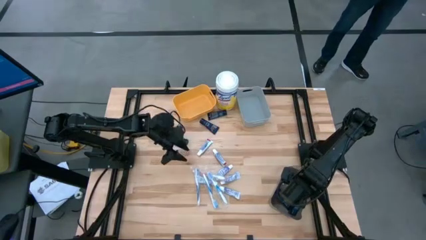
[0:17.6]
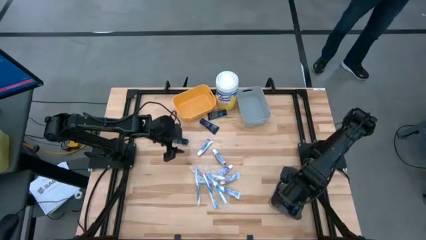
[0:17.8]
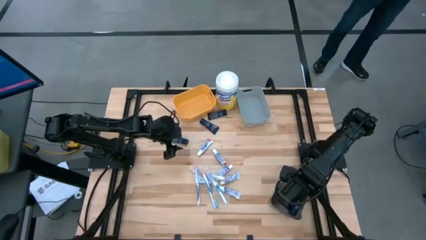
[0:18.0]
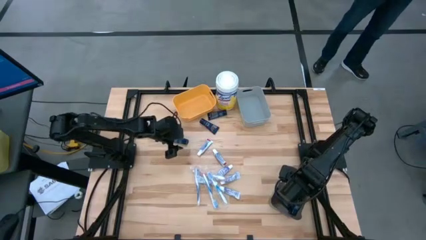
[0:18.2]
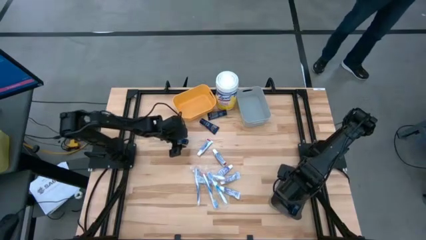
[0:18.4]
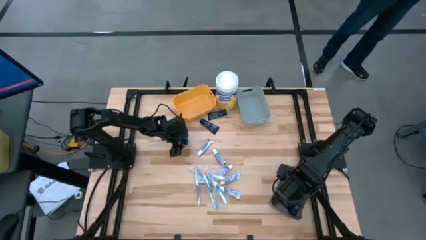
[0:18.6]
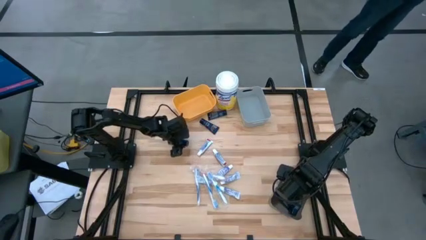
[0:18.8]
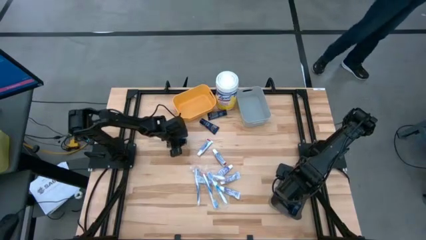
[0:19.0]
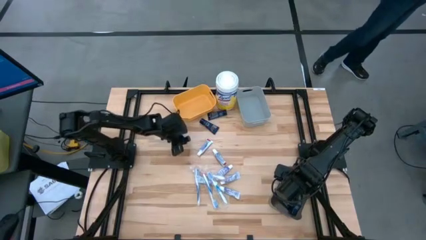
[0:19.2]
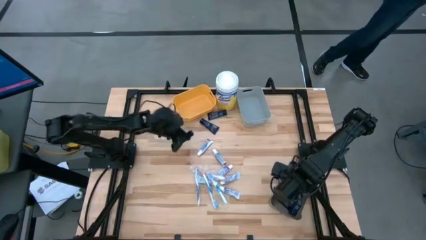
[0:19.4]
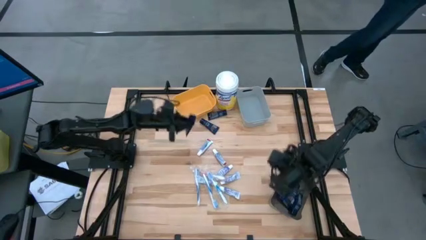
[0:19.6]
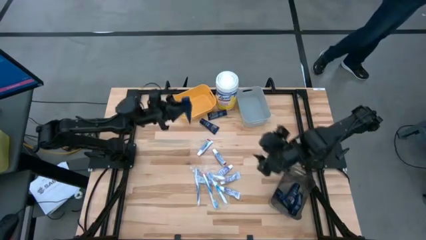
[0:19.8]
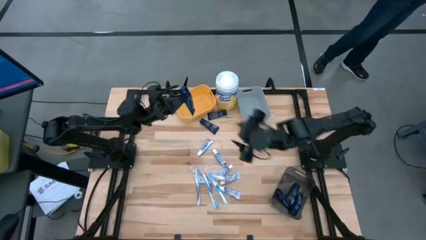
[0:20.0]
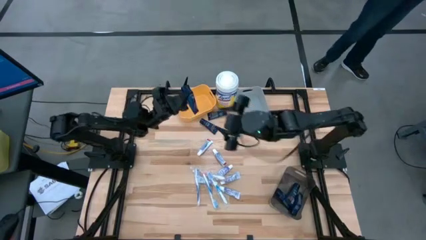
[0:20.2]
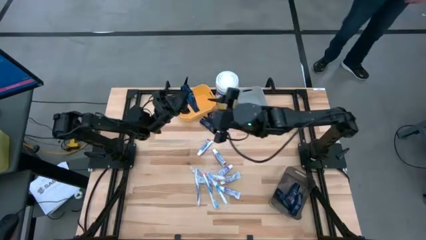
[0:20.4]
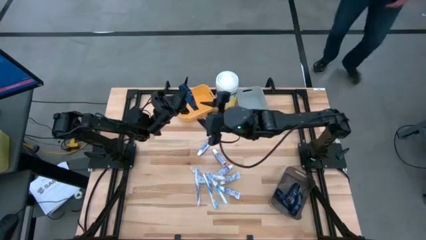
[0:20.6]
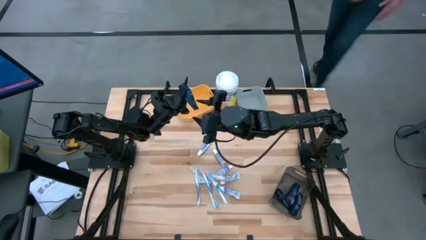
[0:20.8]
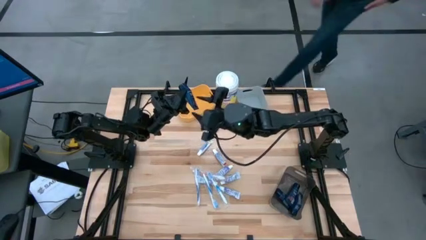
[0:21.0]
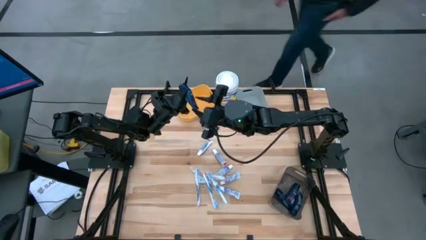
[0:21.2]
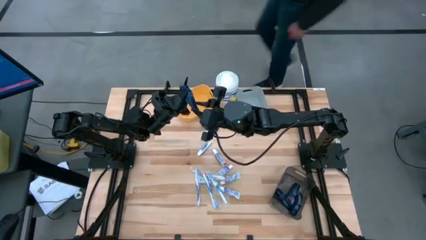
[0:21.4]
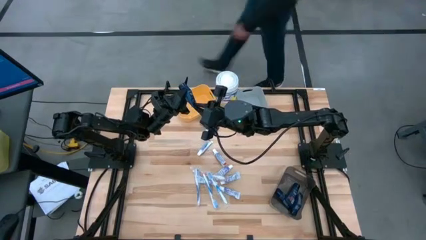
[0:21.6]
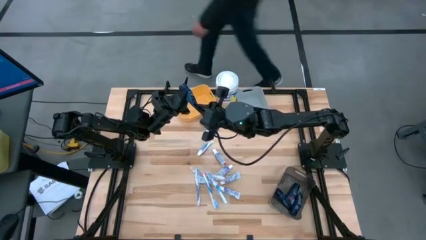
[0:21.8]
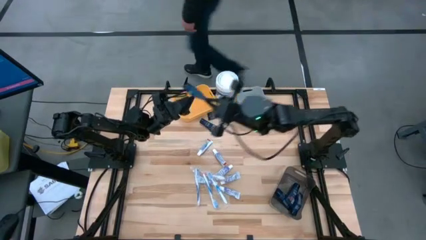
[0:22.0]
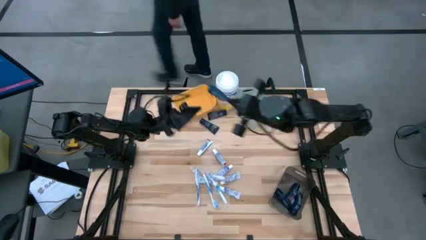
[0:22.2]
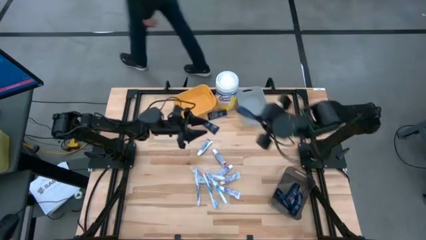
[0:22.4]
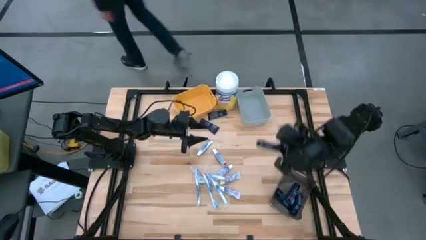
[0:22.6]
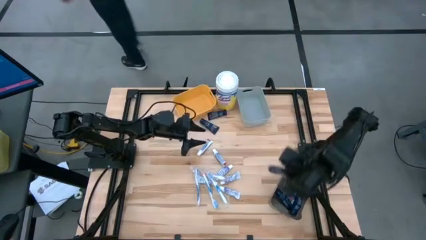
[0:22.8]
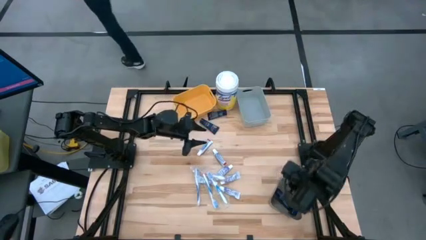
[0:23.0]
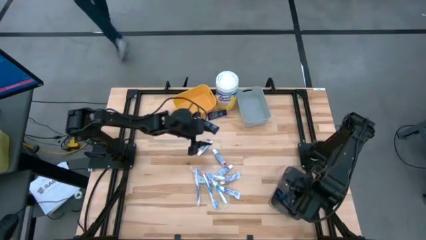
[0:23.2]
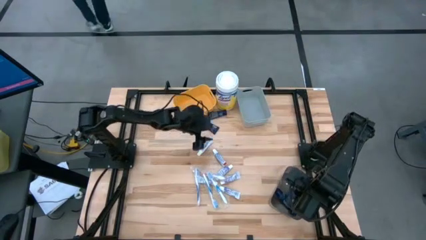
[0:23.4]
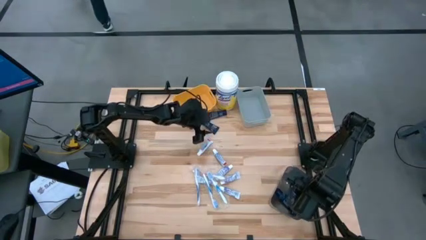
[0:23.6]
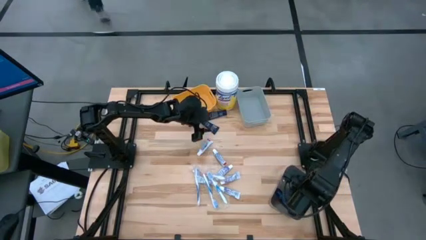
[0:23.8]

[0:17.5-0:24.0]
Task: Pick & Place Travel size toiletries
Put the blue shaving butter into the black bin

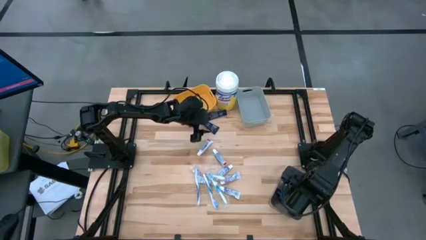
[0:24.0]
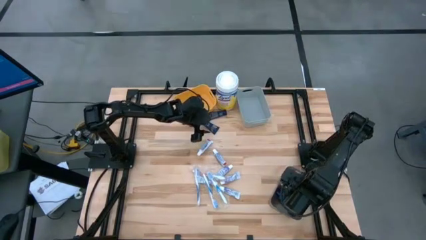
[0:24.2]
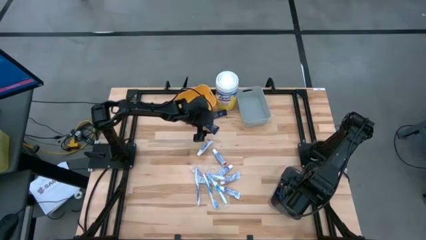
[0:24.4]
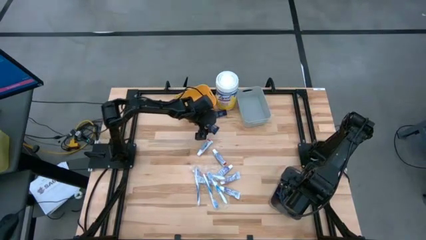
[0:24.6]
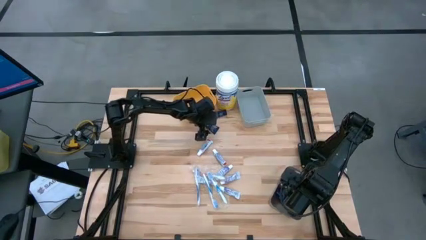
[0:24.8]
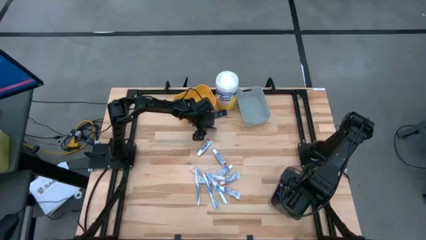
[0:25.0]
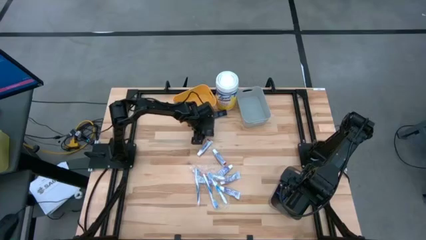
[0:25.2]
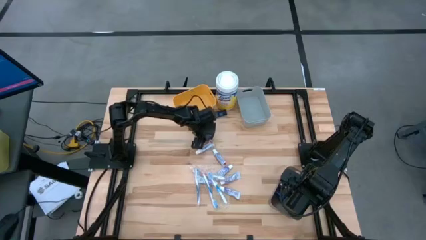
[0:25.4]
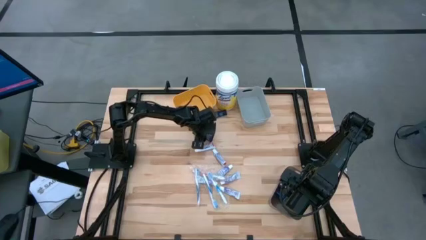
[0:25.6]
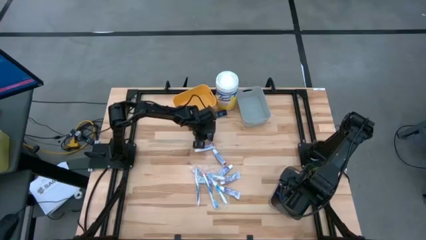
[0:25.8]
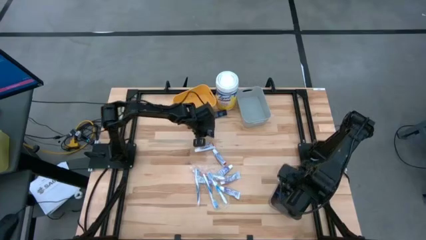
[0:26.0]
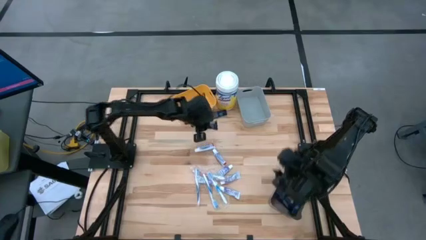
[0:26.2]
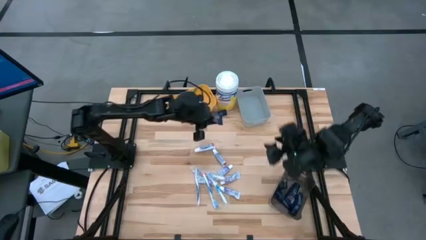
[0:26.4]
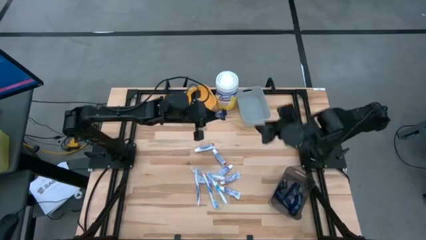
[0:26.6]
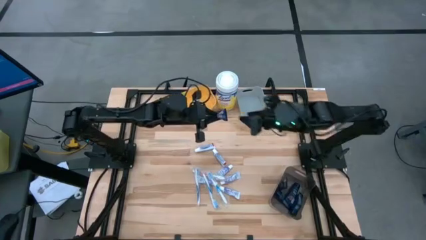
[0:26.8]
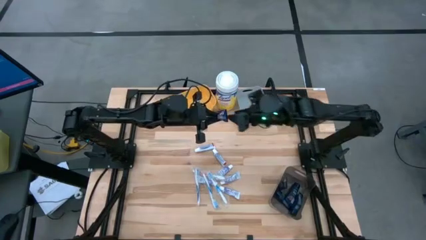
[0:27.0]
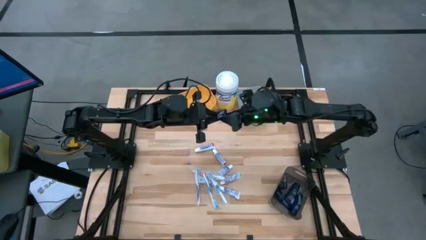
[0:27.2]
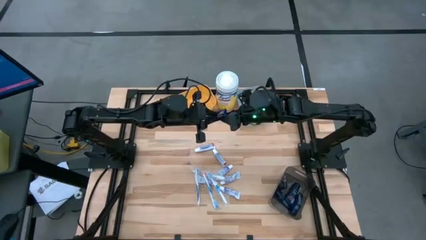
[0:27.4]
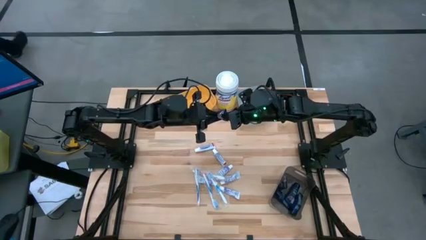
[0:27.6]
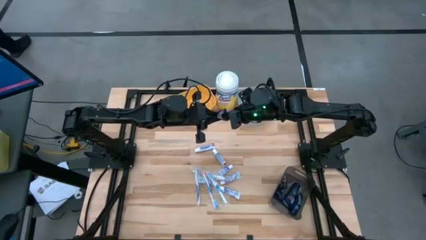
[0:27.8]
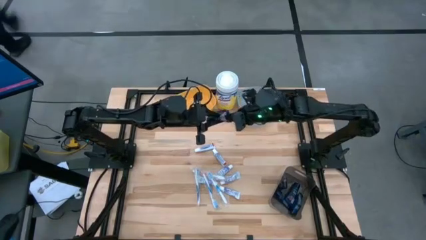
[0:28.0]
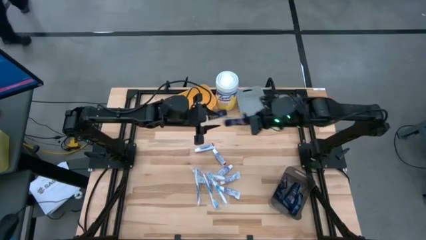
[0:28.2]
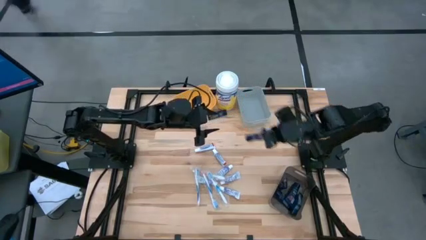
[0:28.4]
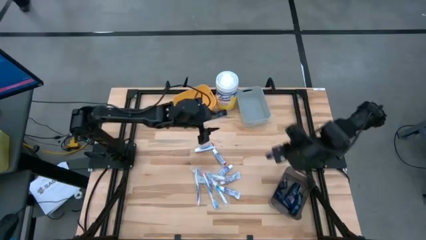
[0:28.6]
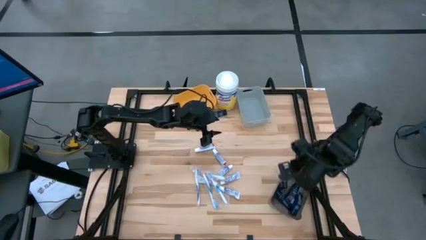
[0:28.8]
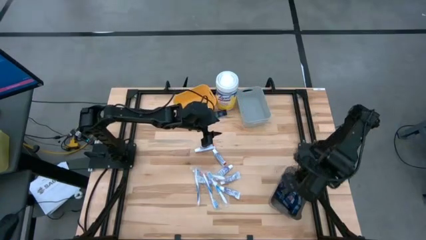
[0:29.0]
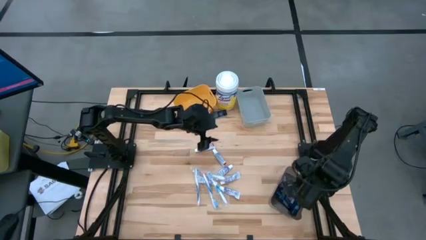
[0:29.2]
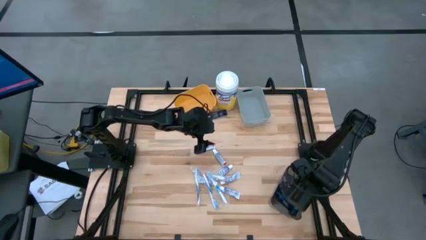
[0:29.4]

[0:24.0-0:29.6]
Put the blue shaving butter into the black bin

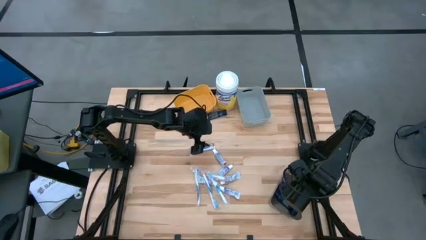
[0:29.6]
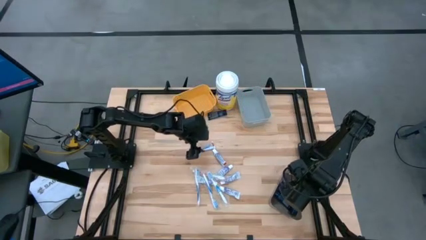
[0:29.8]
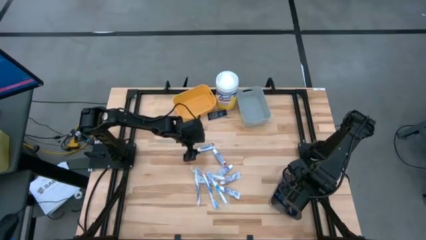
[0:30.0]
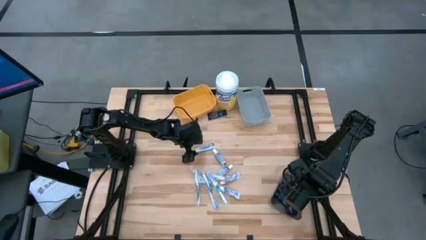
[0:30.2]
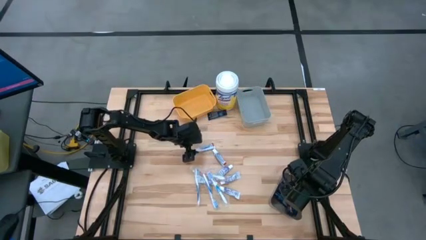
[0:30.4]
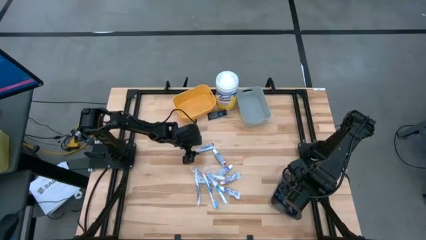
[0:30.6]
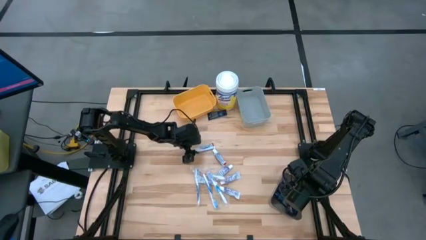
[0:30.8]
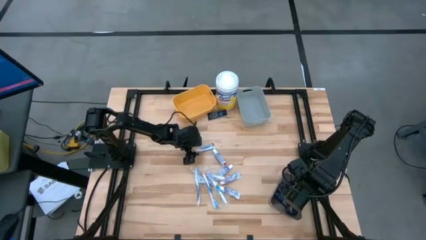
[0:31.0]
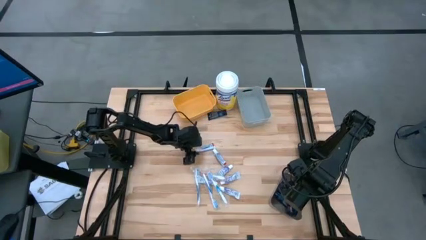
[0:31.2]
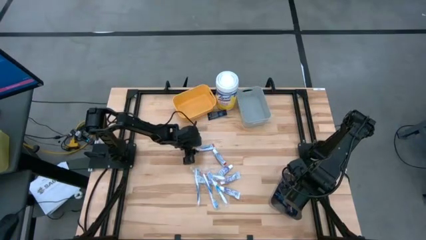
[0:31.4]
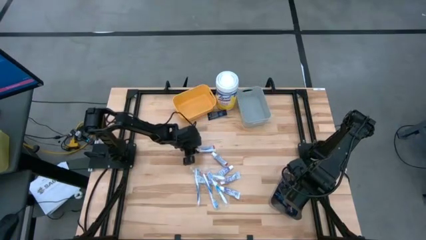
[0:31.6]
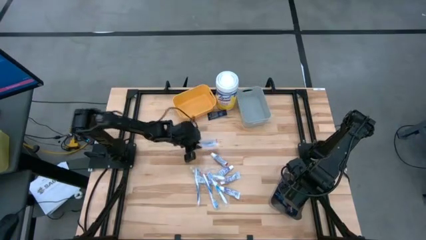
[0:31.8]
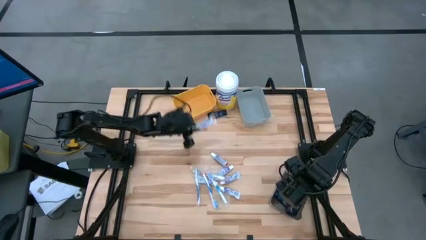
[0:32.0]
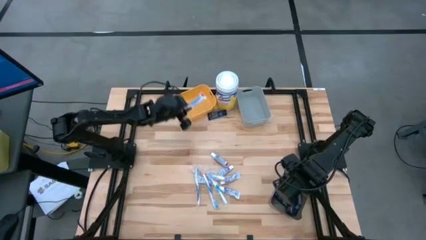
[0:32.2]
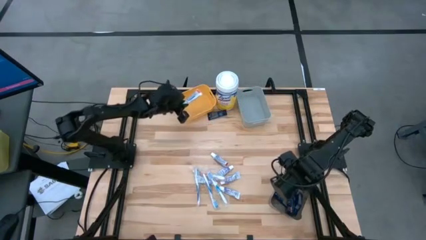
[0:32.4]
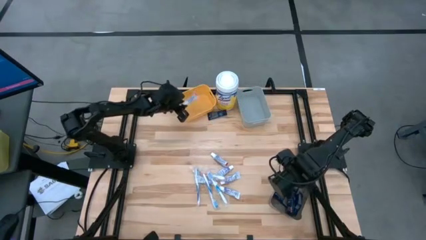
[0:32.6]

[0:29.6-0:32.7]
Put the violet toothpaste into the yellow bin

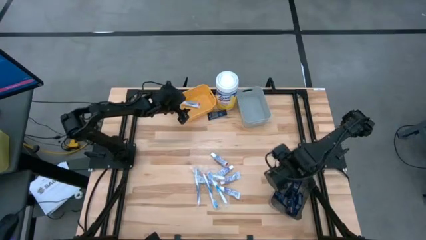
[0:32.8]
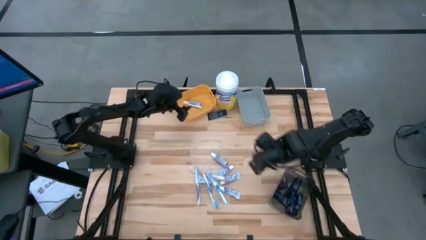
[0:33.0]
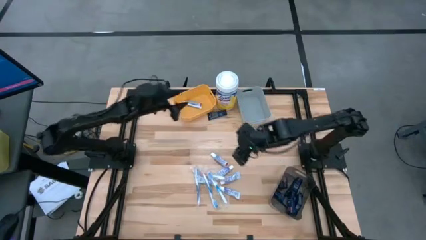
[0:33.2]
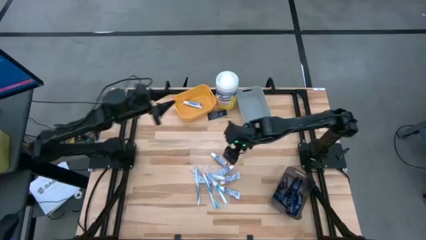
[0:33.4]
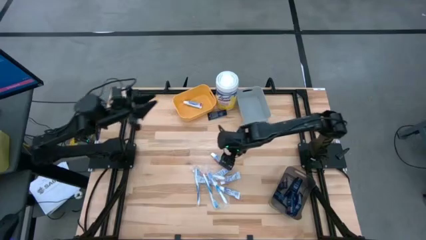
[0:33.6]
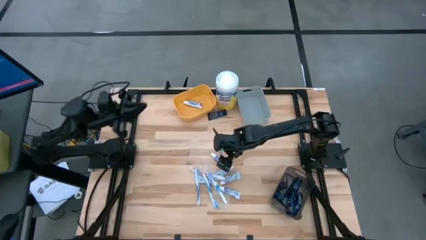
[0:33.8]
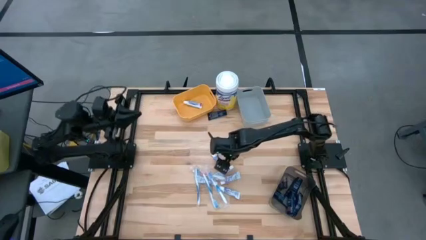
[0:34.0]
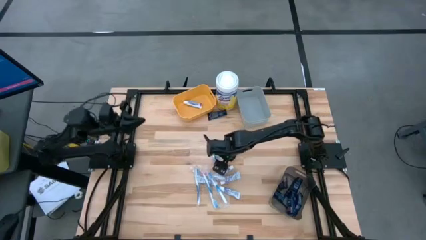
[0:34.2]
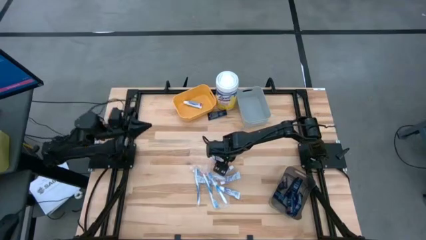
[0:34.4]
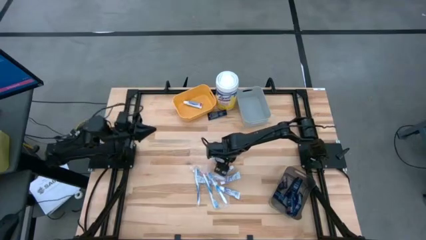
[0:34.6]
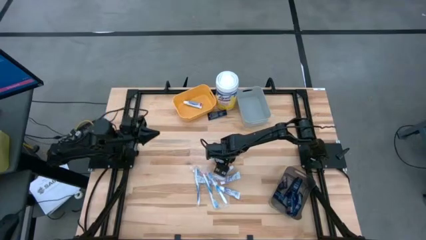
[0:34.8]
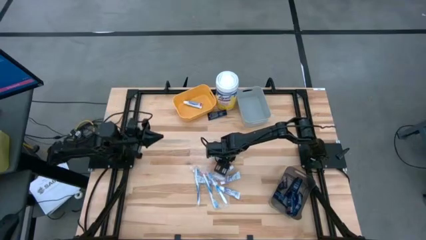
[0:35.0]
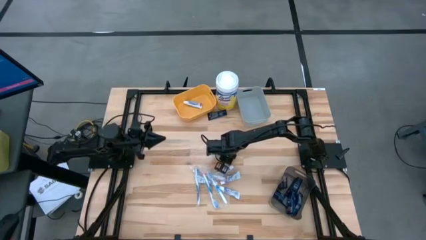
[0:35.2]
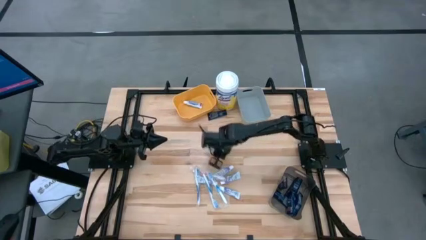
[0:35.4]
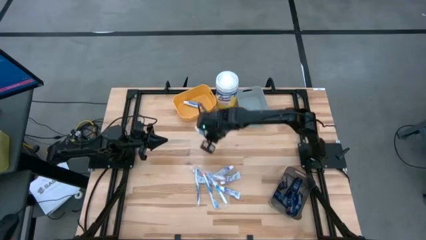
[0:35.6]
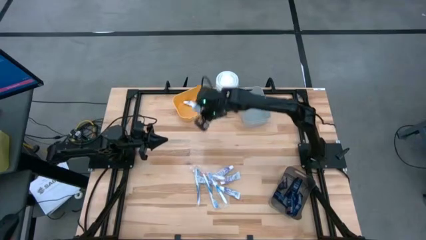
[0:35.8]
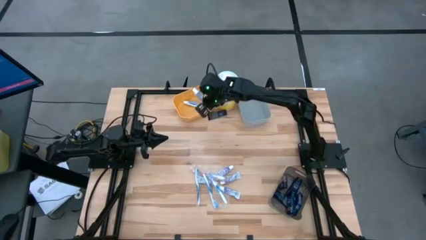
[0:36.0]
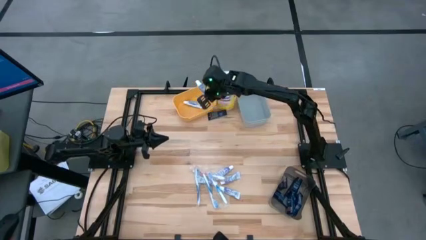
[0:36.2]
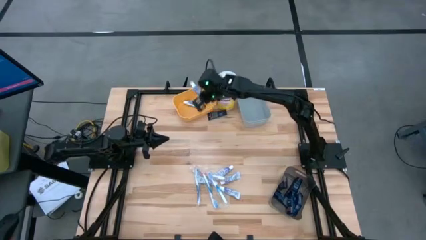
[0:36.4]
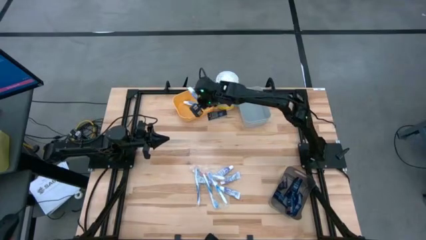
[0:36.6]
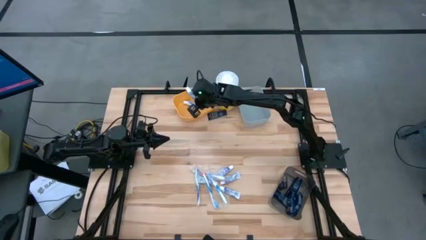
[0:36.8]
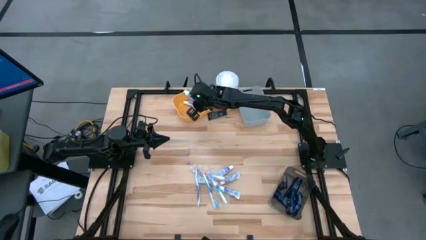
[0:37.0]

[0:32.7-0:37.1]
Put the violet toothpaste into the yellow bin
